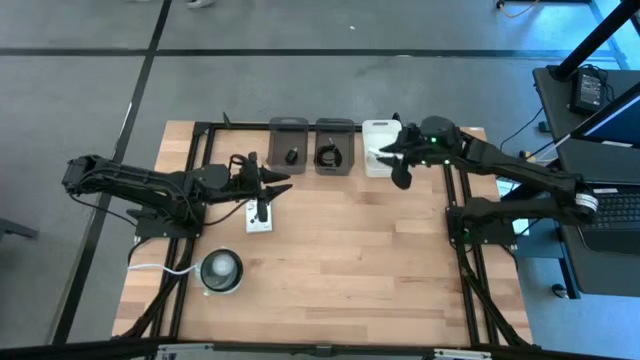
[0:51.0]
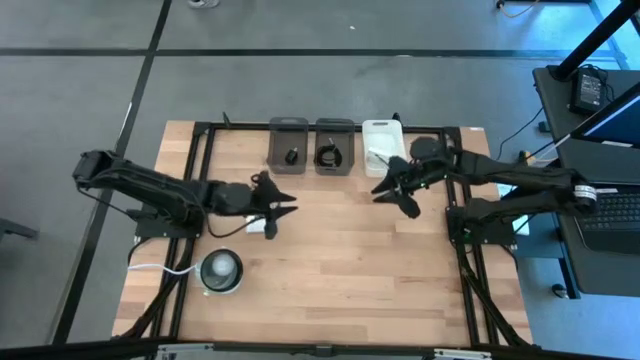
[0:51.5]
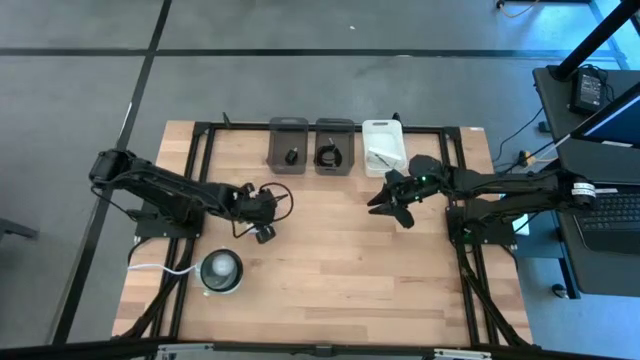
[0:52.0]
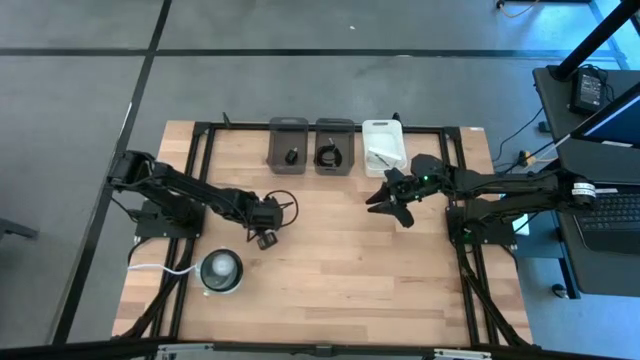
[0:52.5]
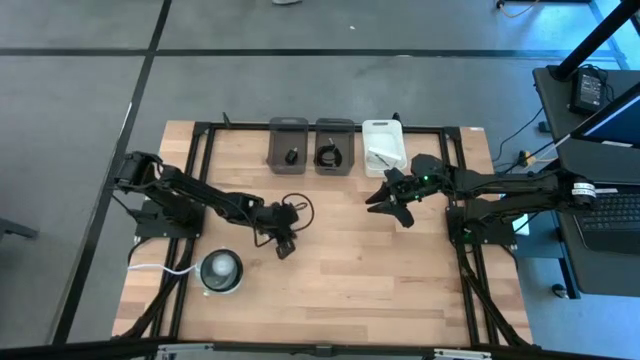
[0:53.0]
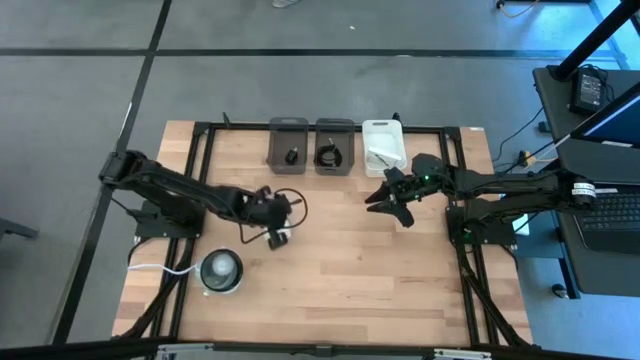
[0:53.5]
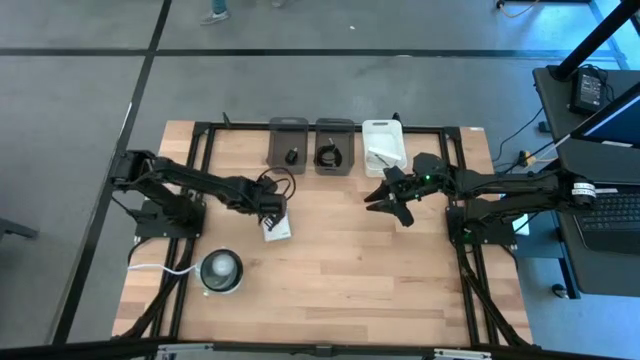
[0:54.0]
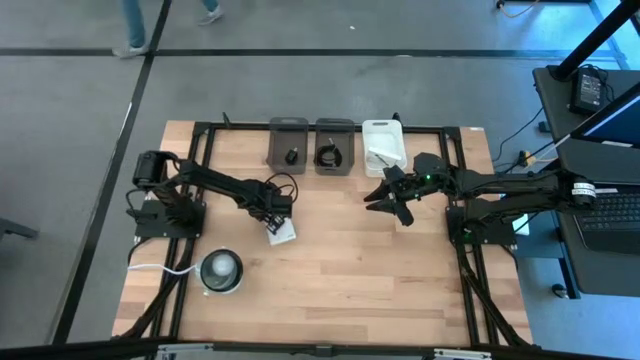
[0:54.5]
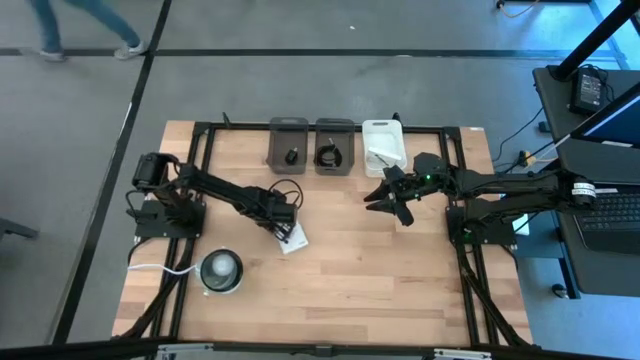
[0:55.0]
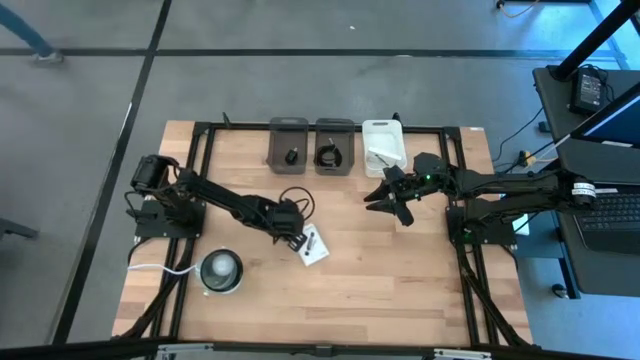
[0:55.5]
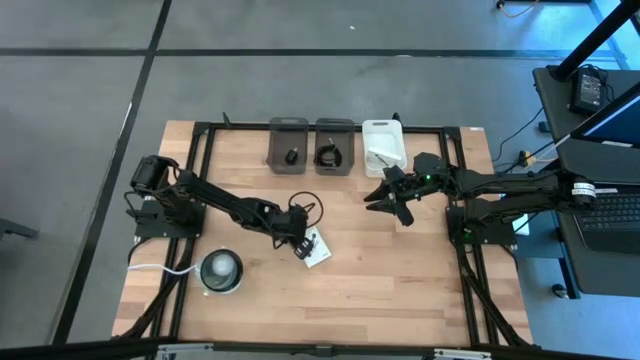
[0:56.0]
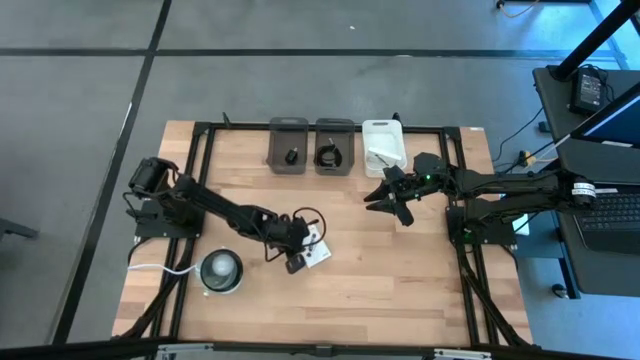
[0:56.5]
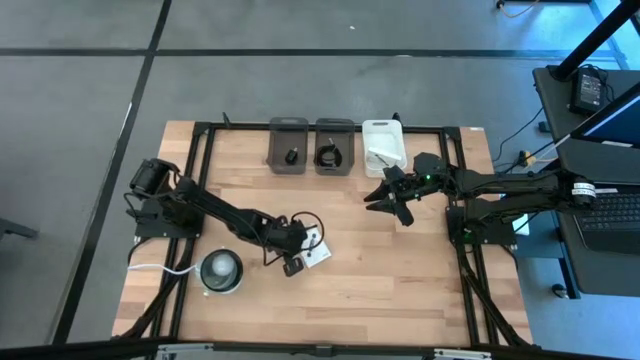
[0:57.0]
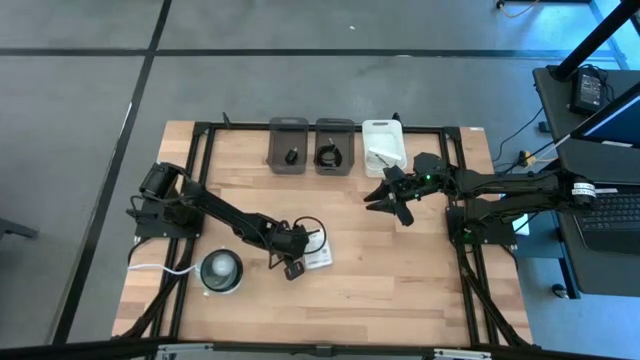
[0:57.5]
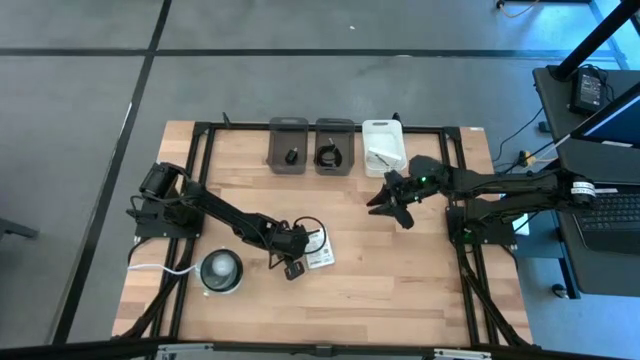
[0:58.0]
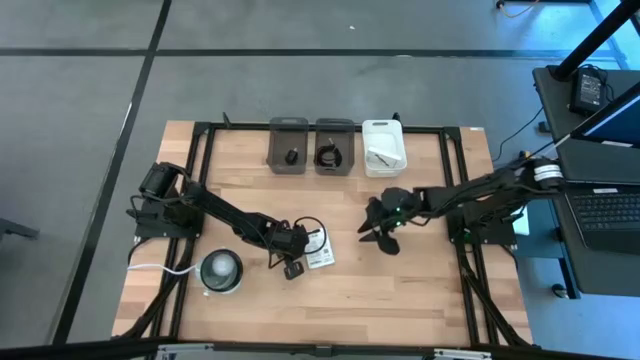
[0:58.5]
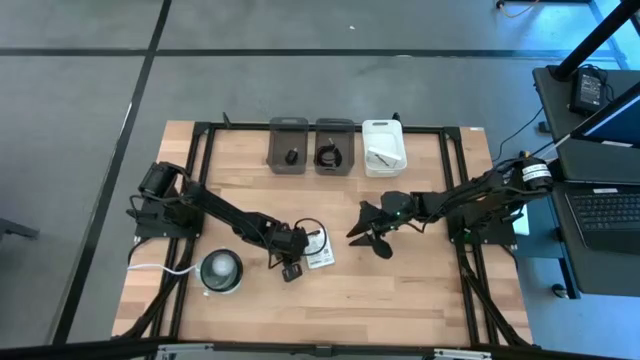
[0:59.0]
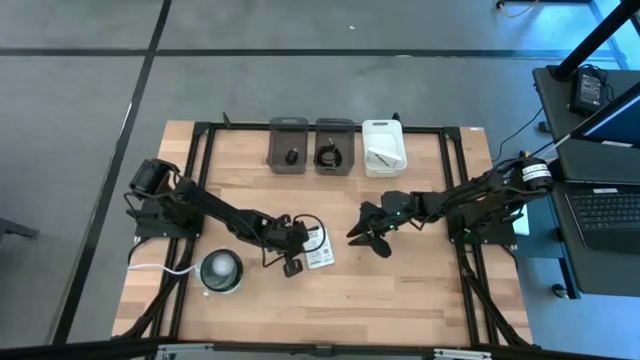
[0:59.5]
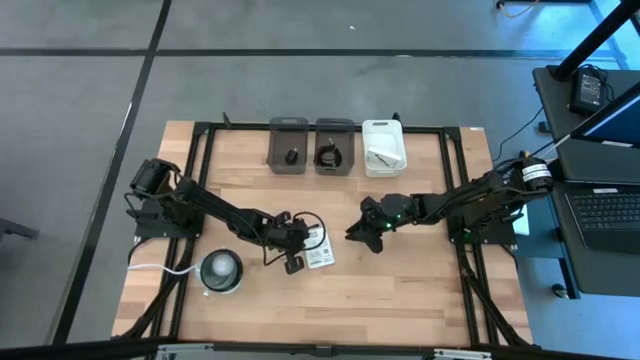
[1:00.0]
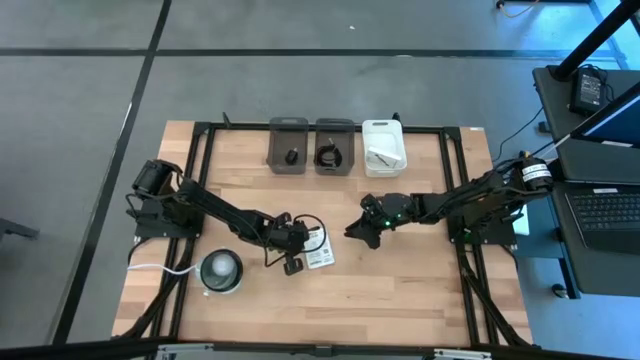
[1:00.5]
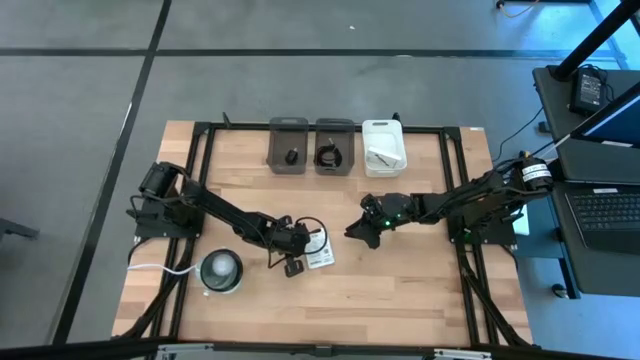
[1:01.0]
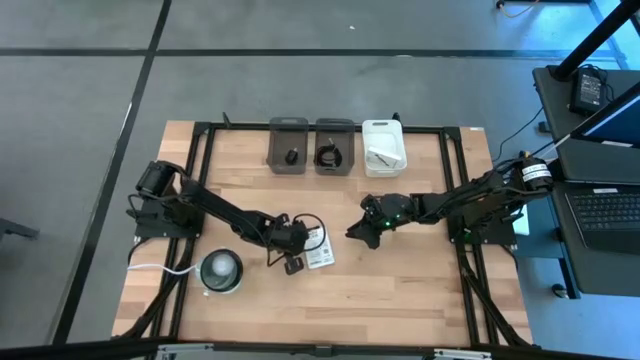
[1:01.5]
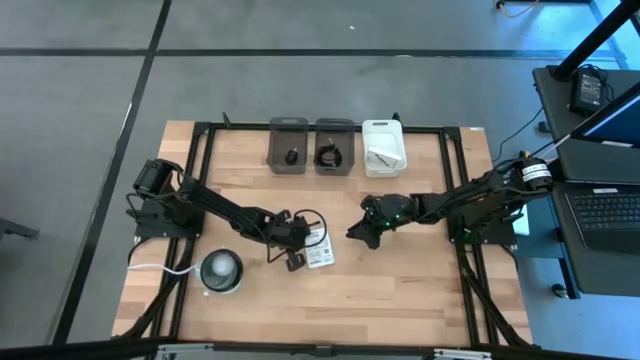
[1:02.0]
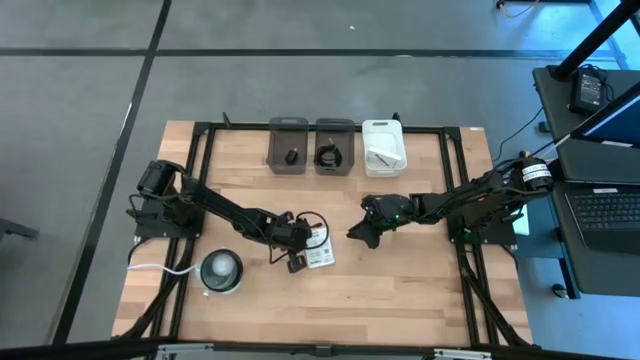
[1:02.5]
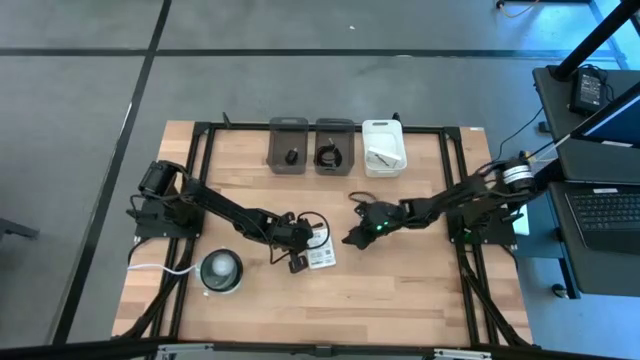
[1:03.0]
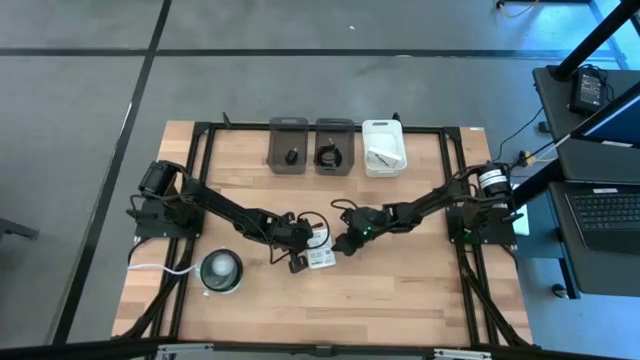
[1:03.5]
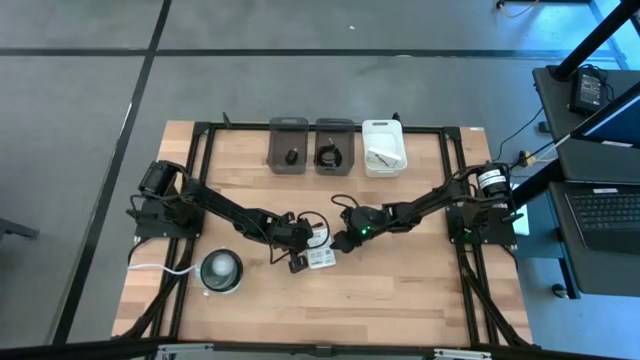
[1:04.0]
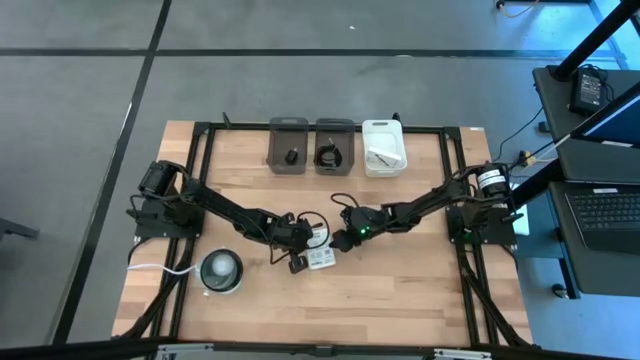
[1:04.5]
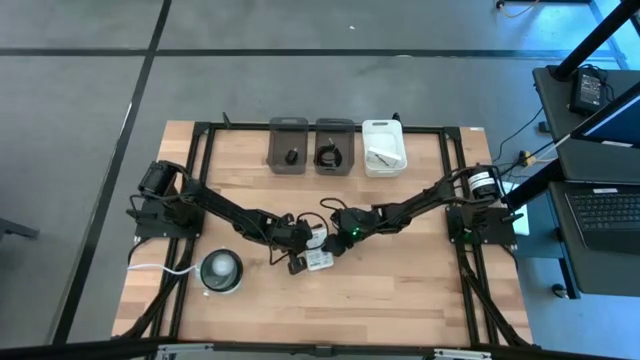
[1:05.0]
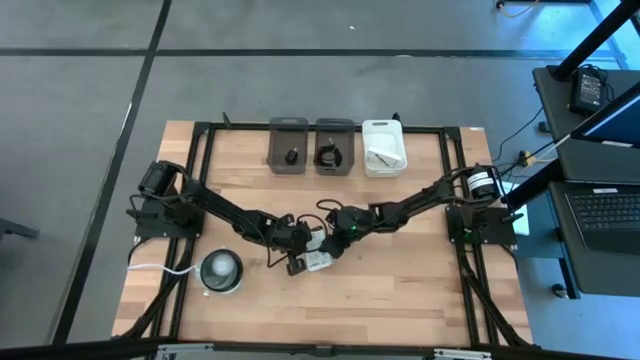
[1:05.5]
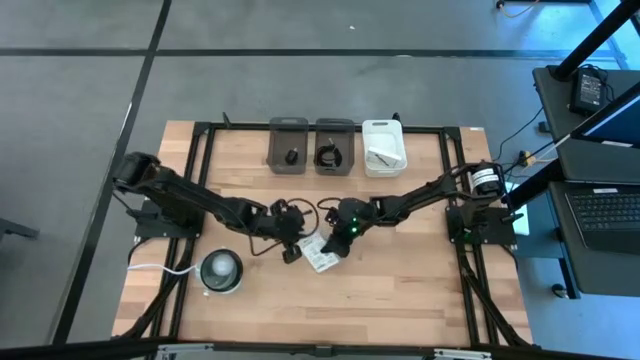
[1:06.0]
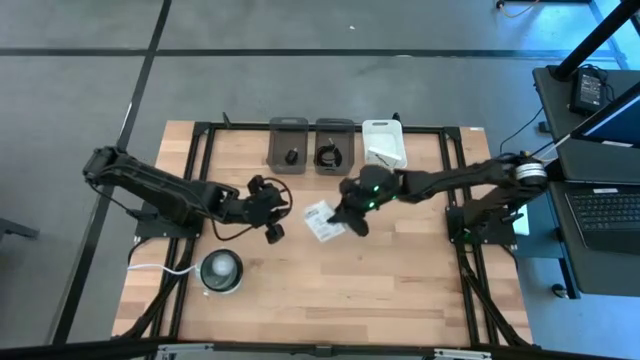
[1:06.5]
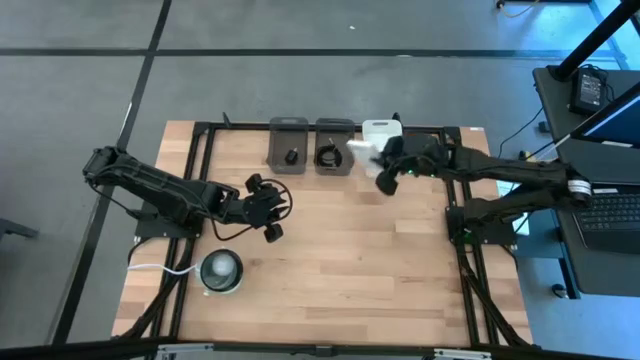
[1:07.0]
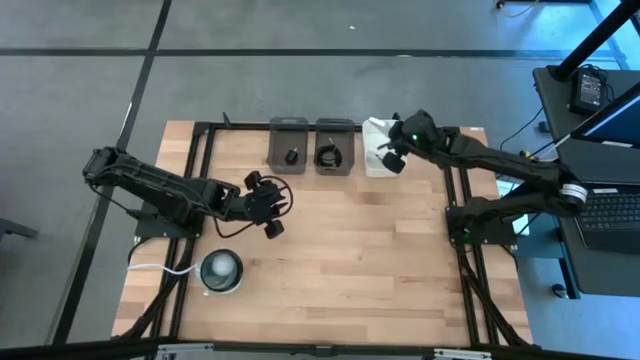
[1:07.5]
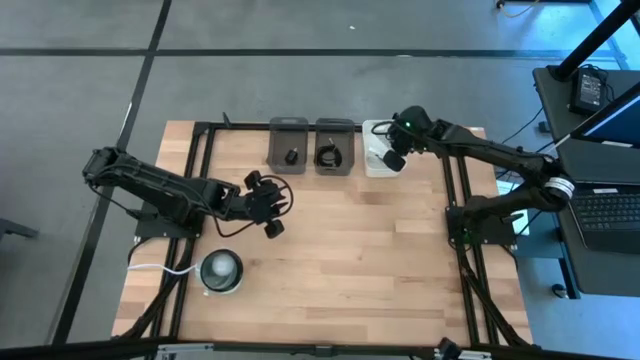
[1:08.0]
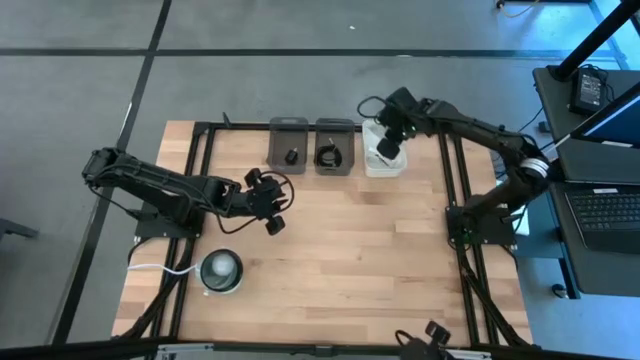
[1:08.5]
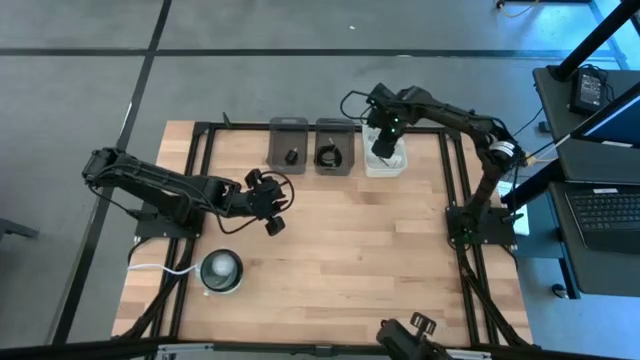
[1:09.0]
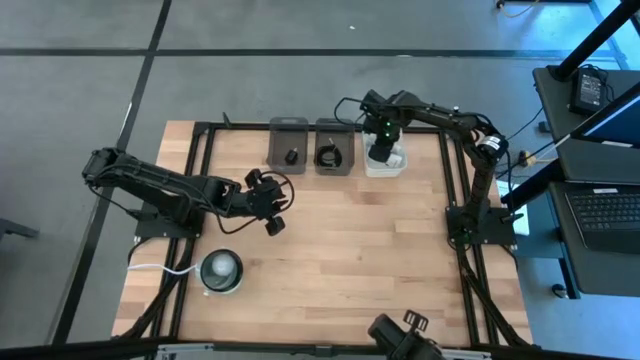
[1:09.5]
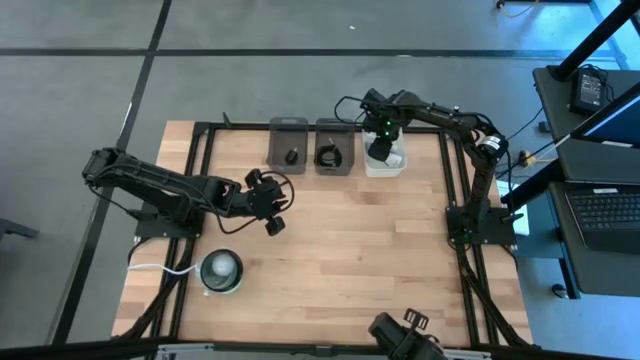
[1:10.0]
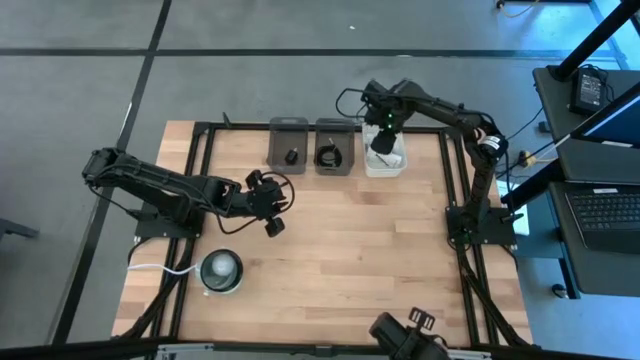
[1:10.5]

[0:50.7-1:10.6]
Task: Pick and place items into bin
Put the white card reader box into the white bin
